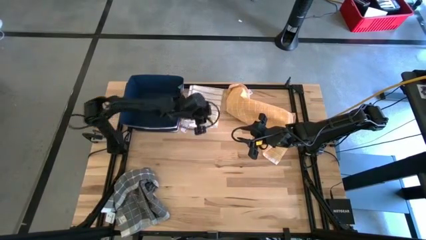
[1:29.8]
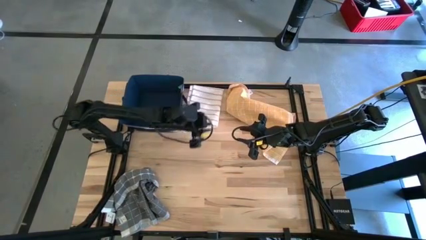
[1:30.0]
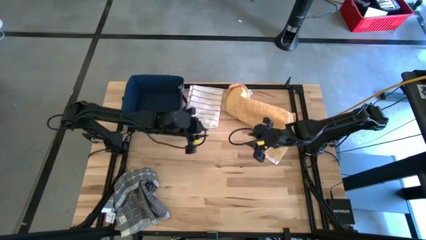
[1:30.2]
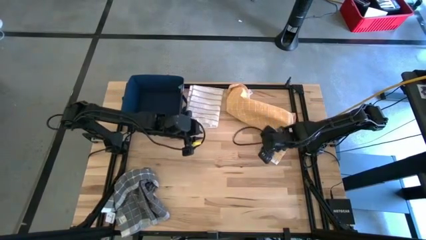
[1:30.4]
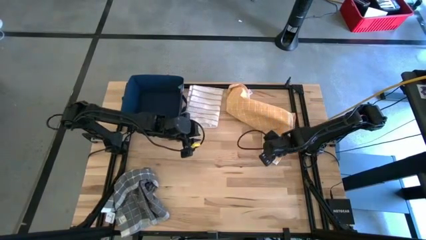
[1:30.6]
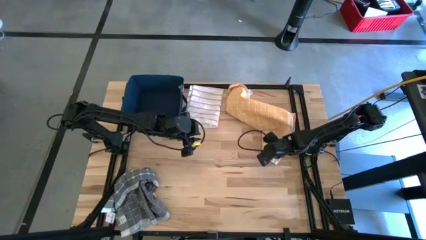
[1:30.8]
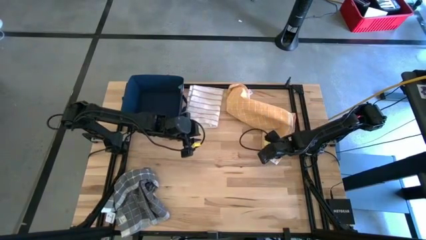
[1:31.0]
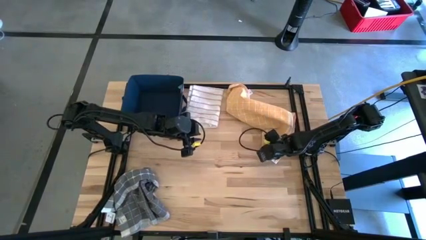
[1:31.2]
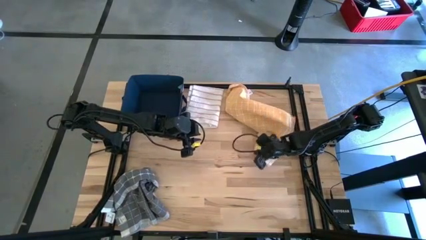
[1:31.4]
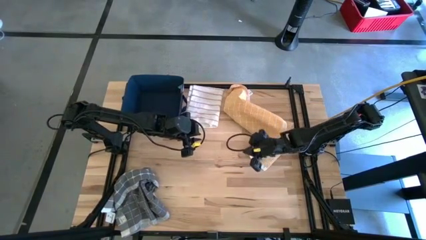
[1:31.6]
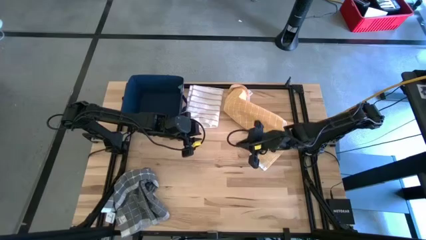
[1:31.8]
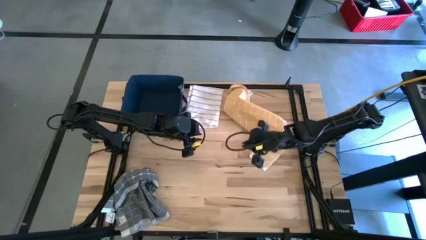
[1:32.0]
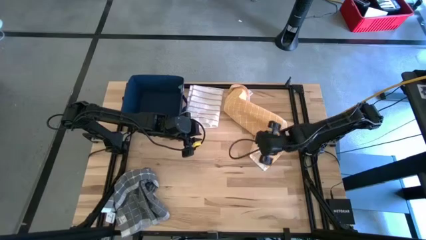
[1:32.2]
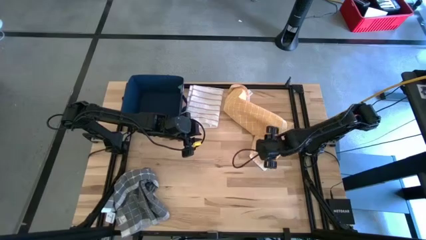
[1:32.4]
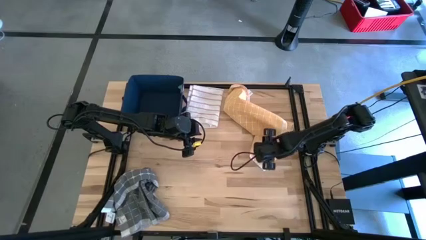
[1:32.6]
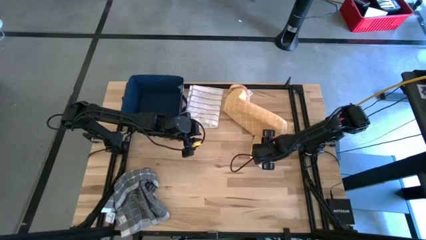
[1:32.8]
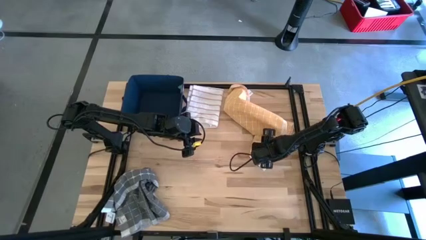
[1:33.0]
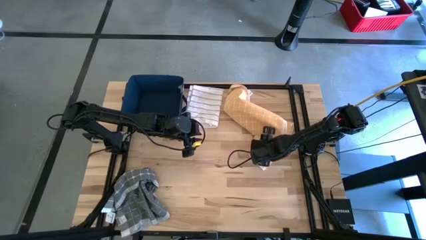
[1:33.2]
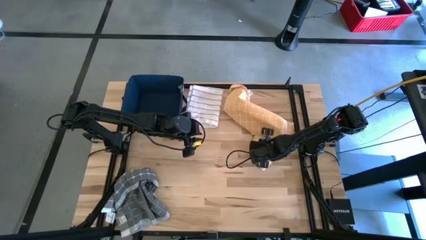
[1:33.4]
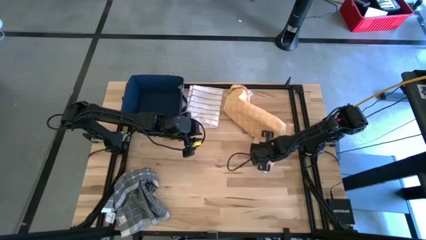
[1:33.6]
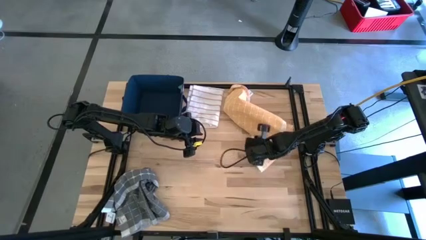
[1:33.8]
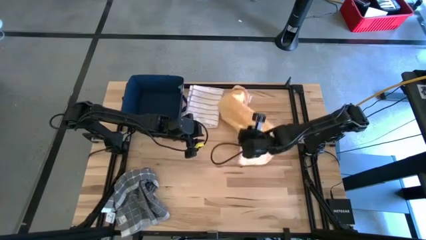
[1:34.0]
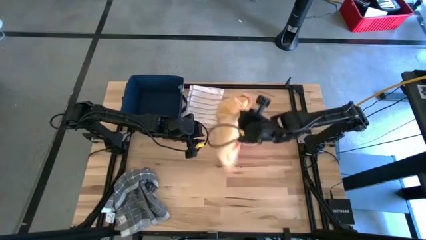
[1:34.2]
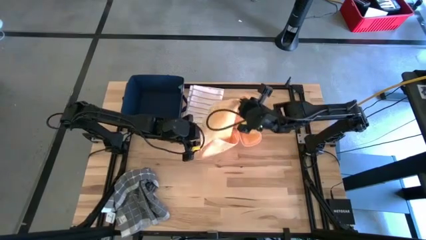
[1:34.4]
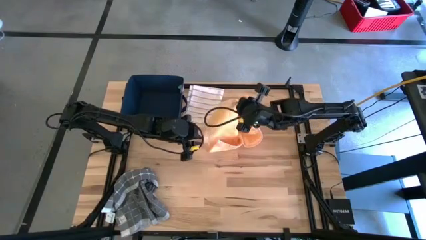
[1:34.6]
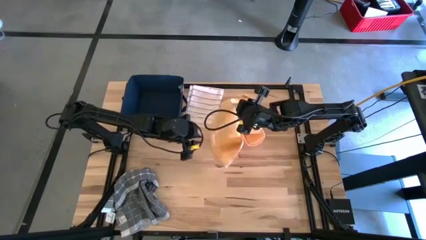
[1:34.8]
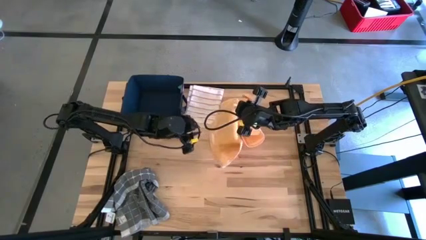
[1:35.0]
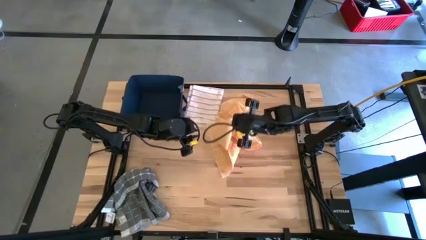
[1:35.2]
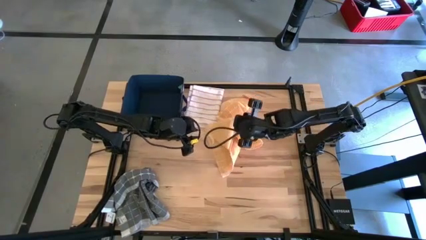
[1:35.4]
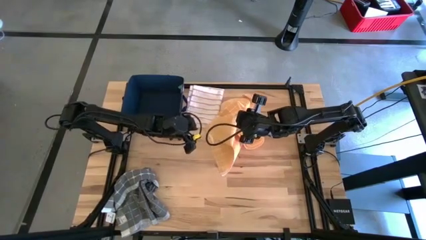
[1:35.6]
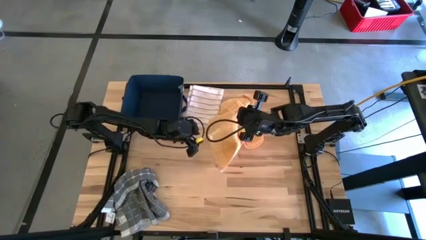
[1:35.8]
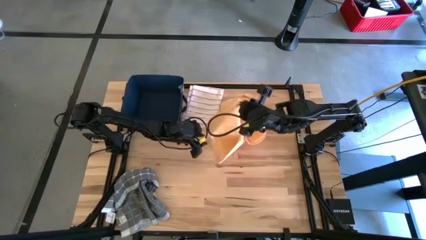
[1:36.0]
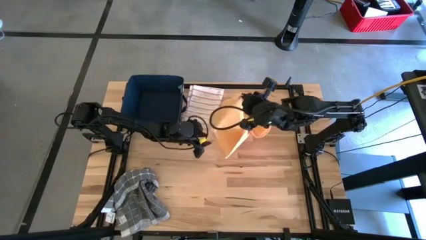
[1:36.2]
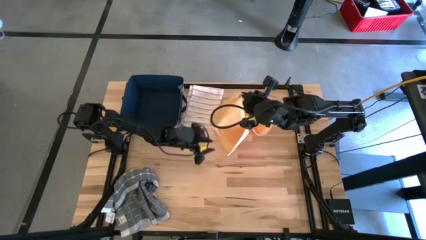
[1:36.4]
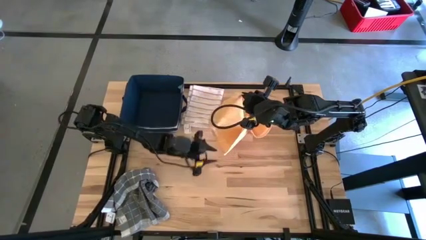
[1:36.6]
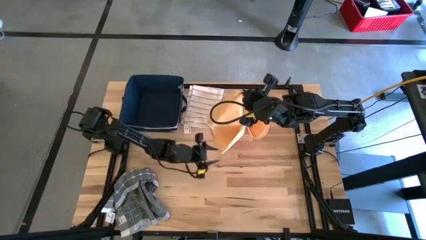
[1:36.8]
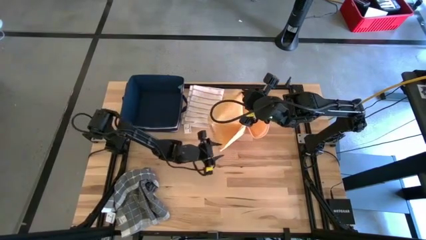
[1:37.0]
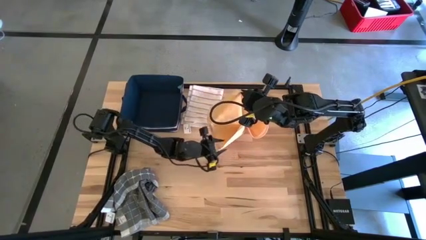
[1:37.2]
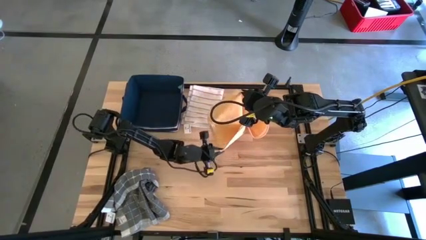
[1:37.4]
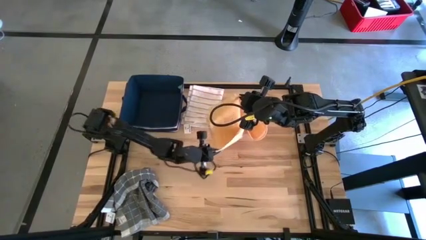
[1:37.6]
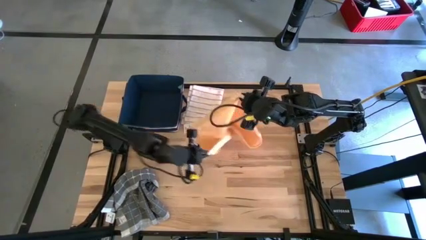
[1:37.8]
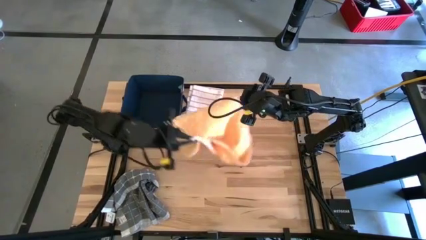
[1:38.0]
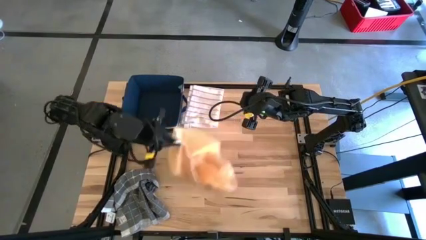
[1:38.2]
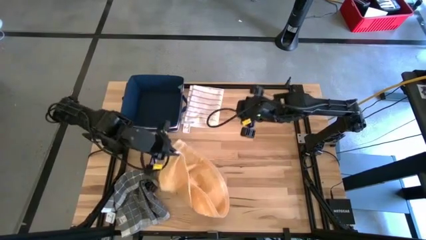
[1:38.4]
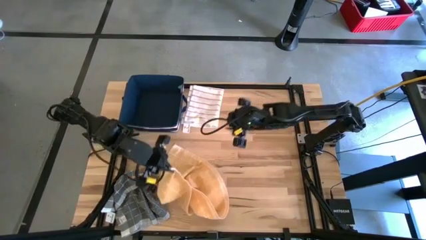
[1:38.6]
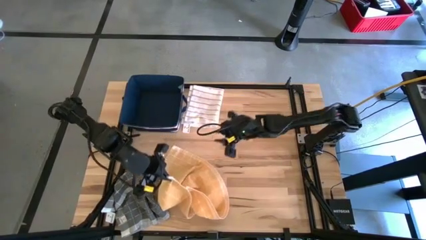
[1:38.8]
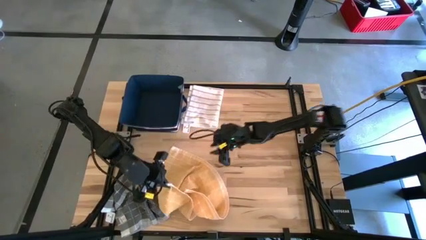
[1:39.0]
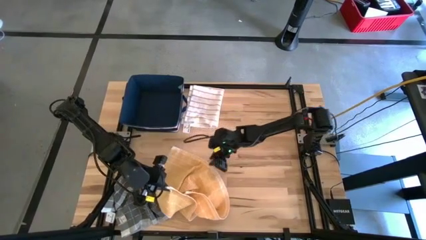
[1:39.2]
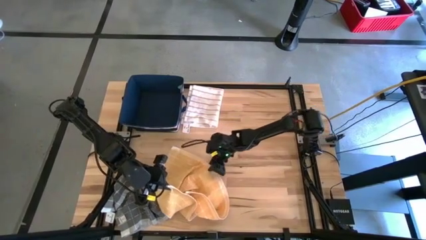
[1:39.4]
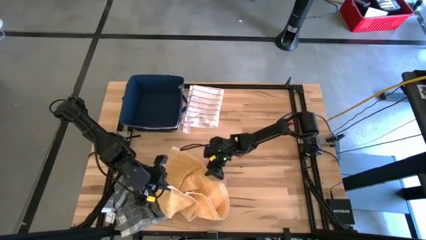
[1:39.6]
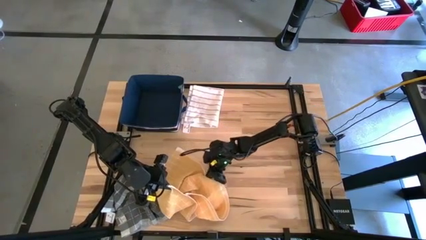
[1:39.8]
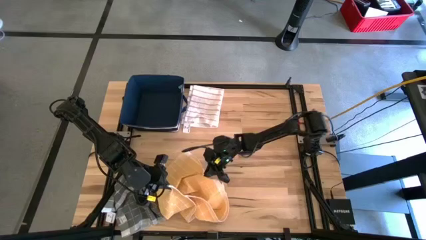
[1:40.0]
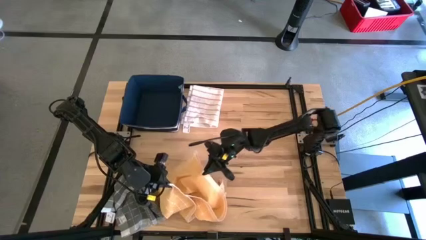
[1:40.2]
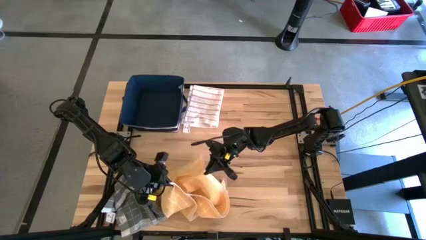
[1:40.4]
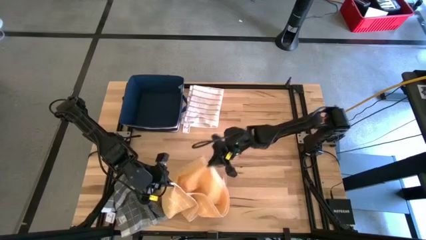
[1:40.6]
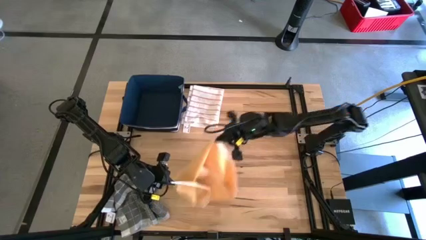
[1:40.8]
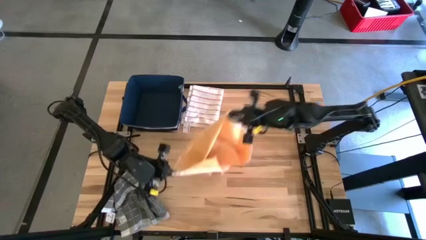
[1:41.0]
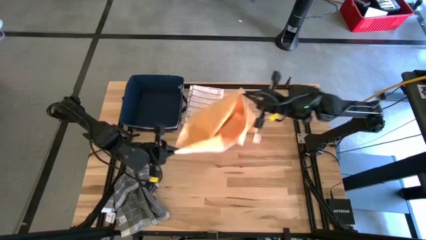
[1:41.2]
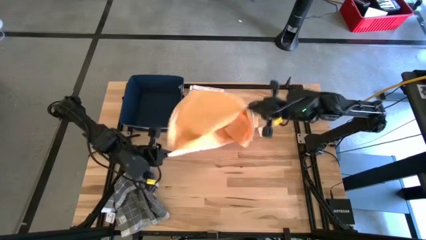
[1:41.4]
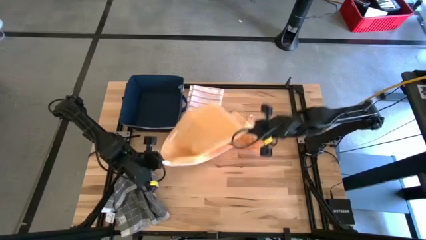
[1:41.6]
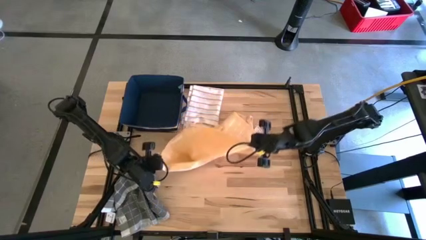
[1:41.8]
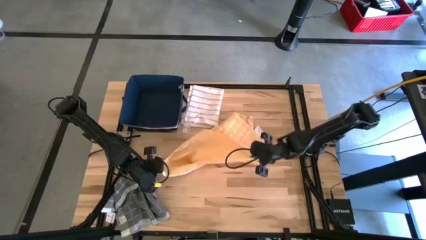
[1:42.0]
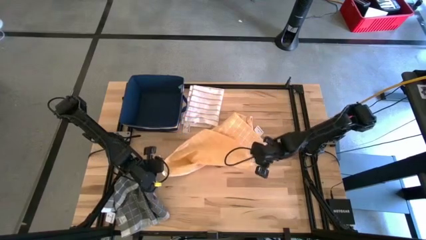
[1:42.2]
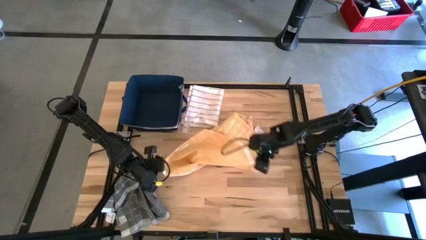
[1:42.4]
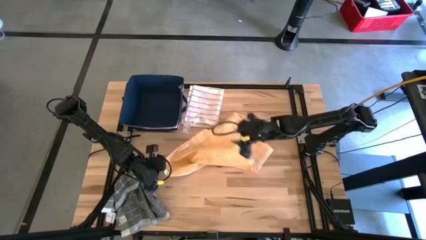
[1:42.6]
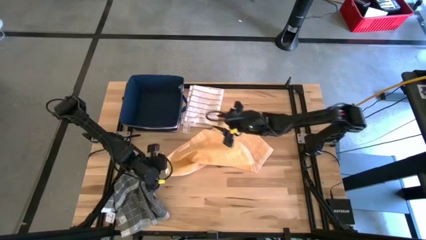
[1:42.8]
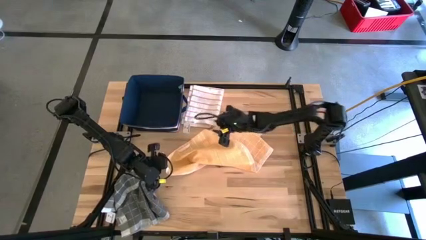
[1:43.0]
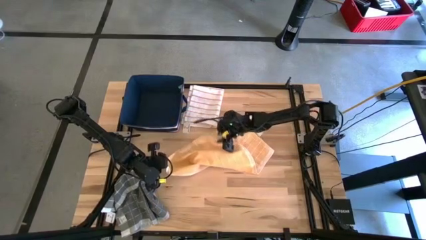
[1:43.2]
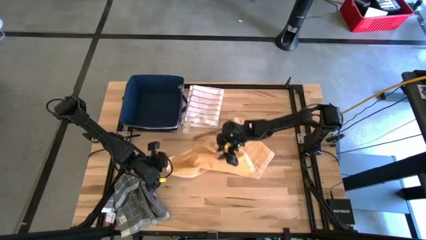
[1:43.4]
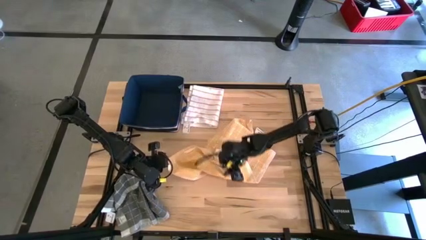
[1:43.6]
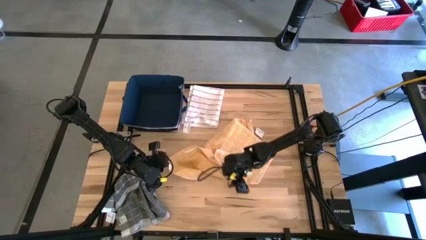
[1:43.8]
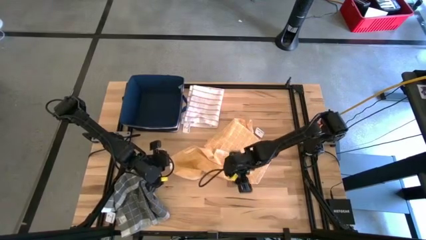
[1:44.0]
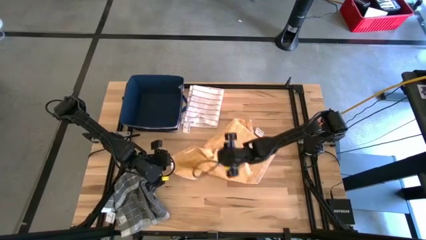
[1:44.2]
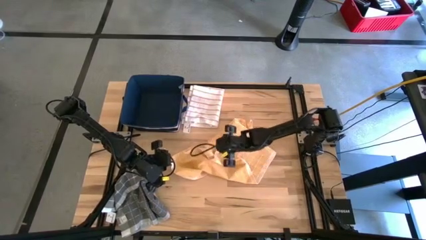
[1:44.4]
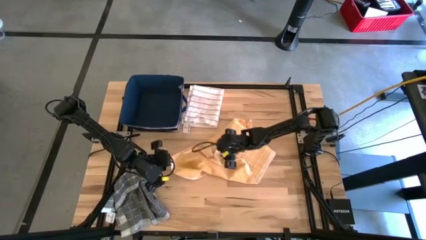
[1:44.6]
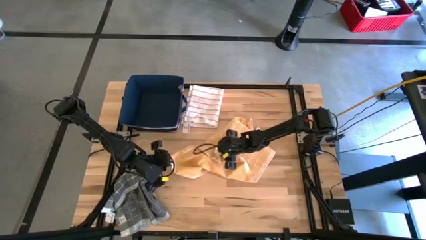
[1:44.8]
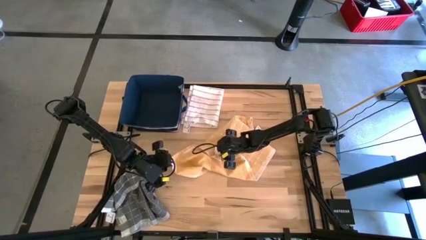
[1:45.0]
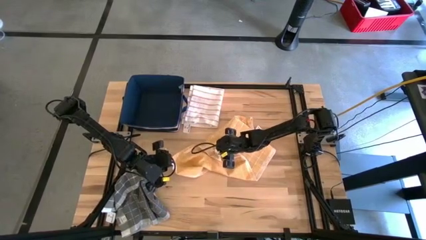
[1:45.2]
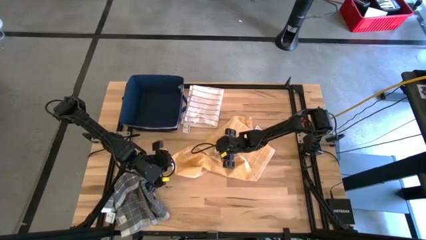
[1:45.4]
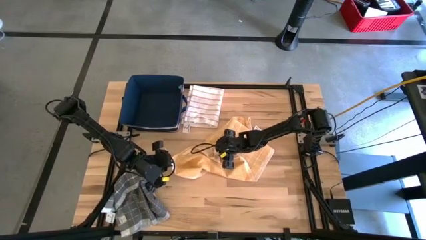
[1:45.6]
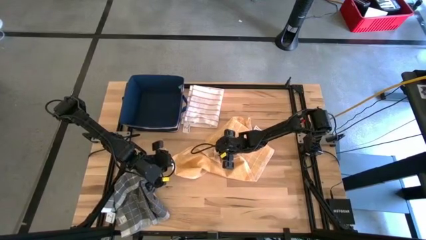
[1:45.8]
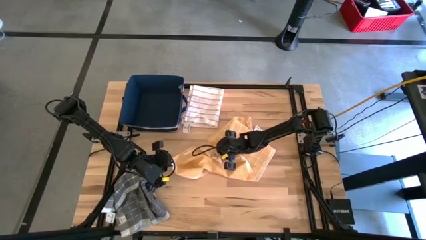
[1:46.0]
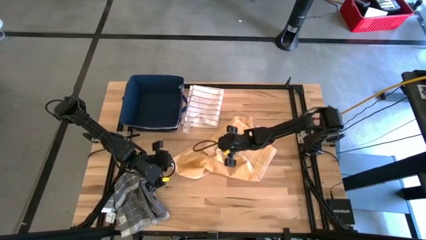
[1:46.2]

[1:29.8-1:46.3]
Task: Fold towel
Fold the orange towel
